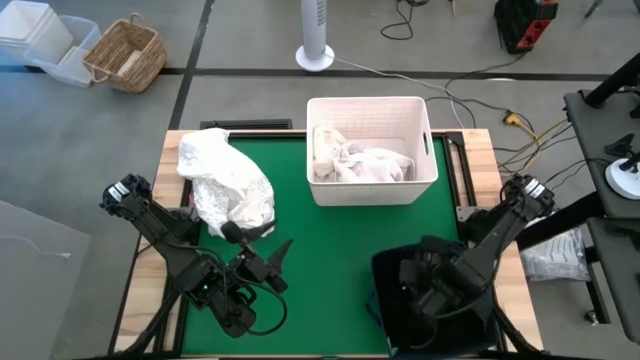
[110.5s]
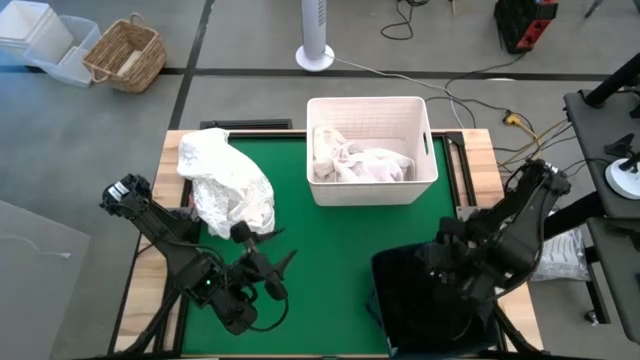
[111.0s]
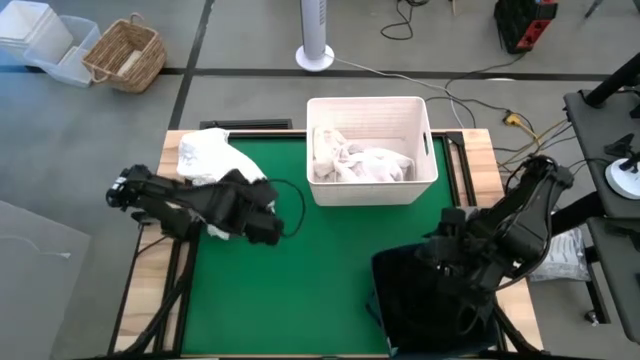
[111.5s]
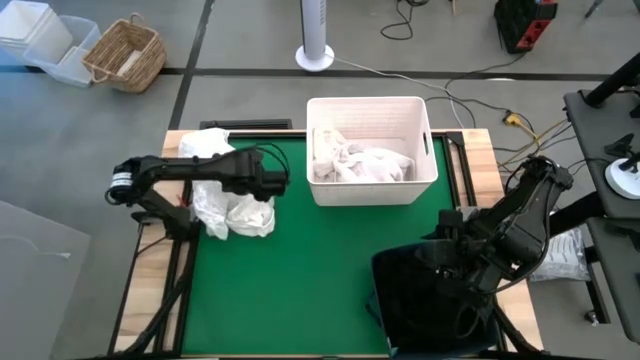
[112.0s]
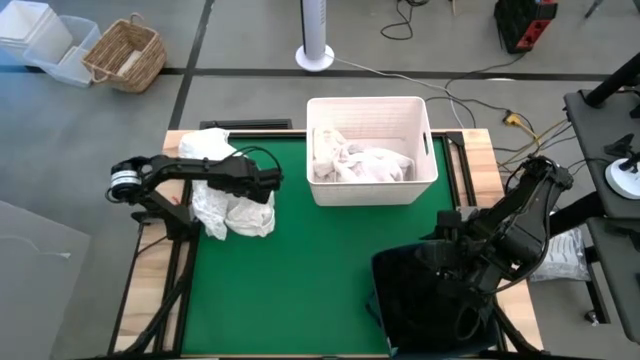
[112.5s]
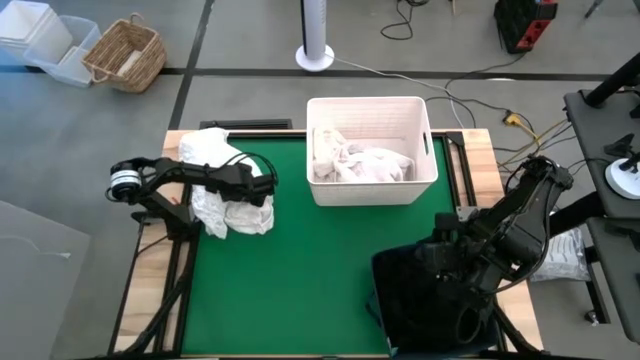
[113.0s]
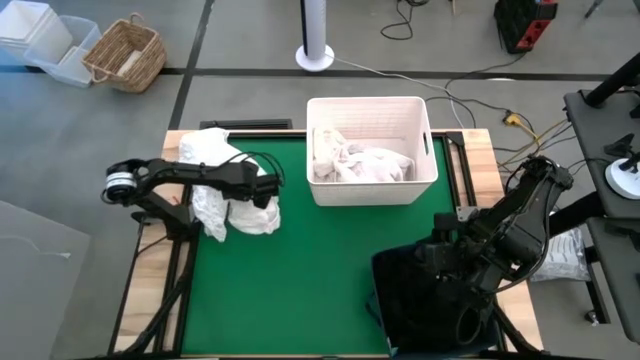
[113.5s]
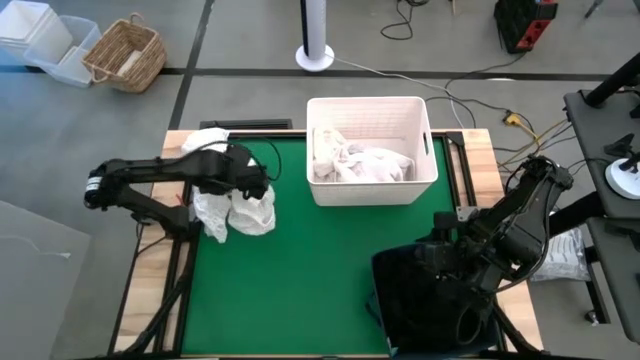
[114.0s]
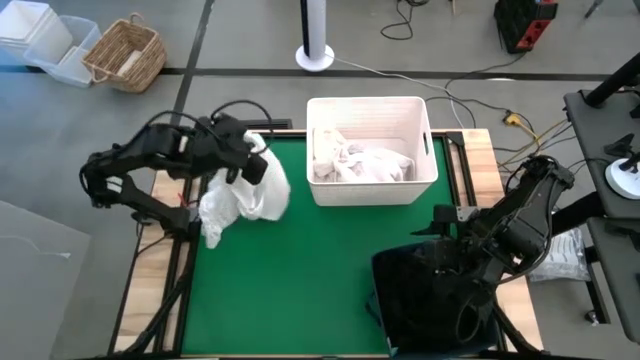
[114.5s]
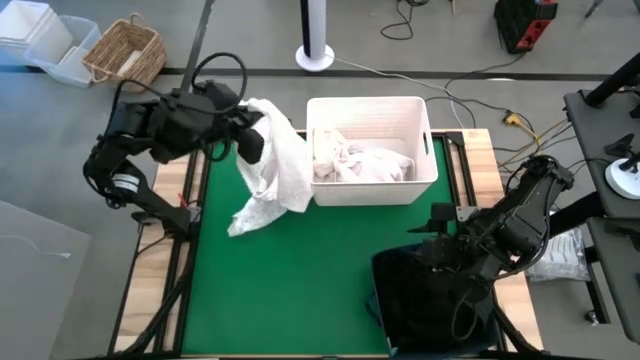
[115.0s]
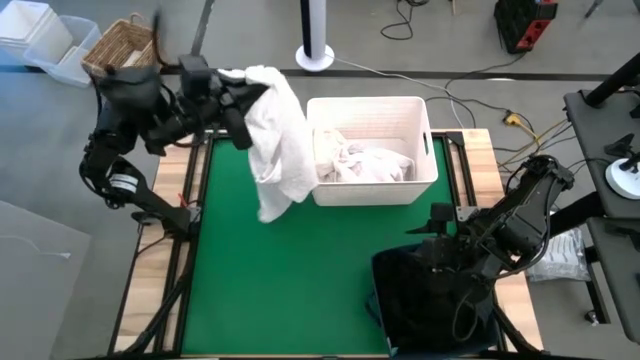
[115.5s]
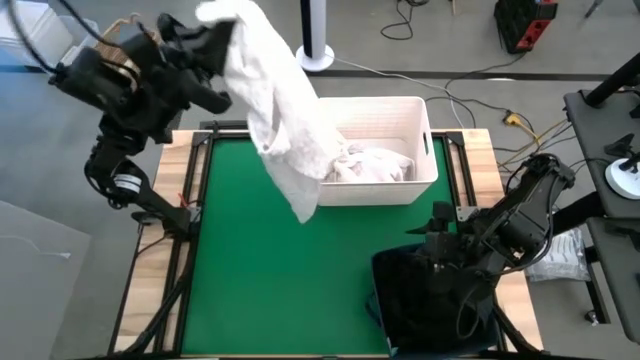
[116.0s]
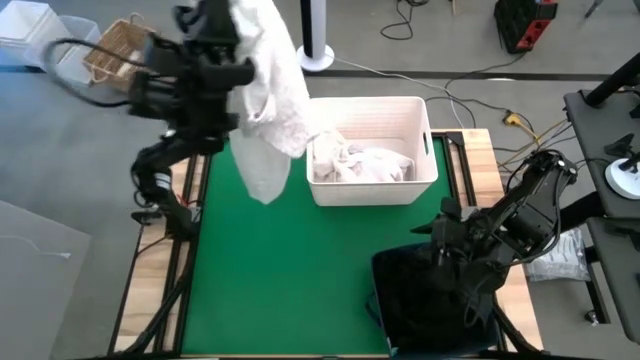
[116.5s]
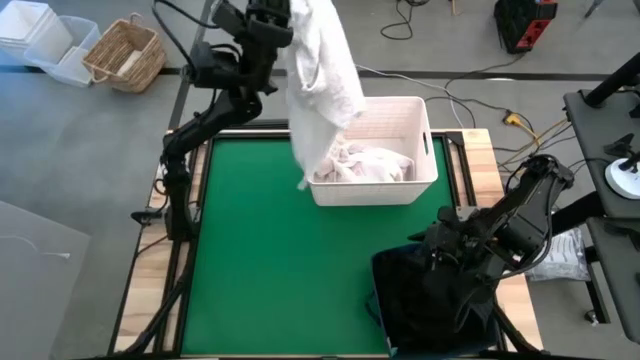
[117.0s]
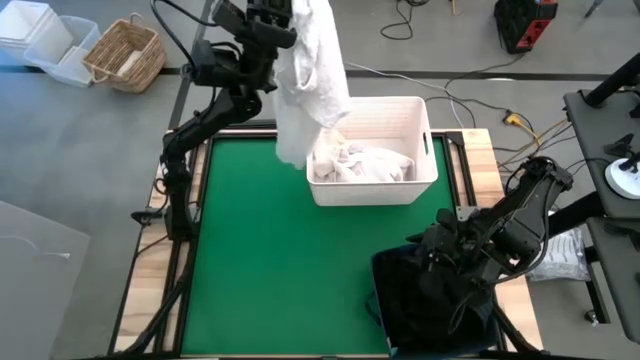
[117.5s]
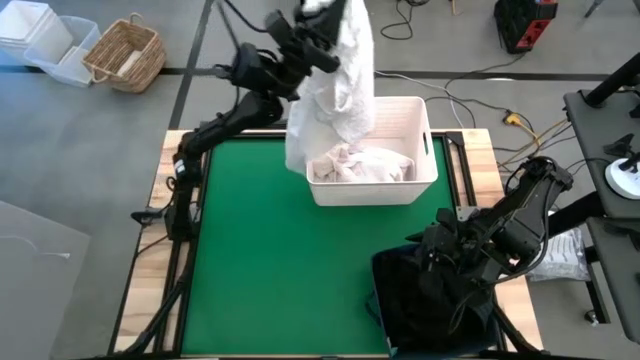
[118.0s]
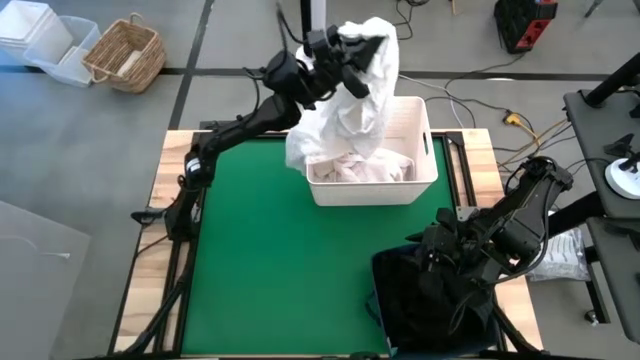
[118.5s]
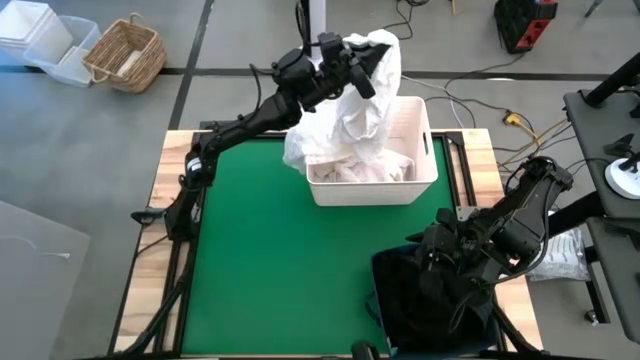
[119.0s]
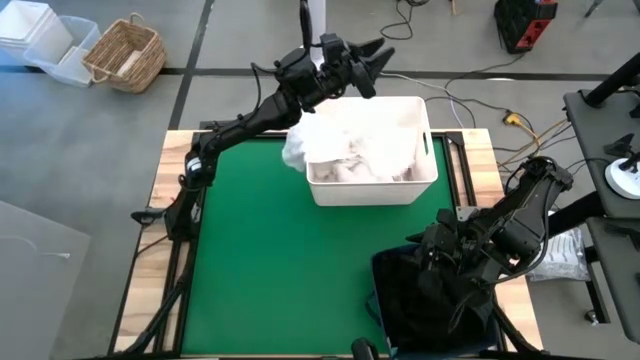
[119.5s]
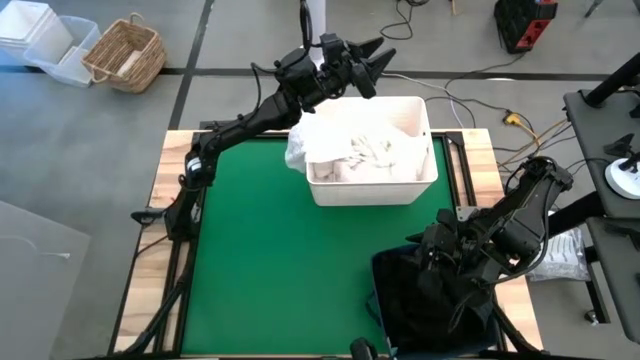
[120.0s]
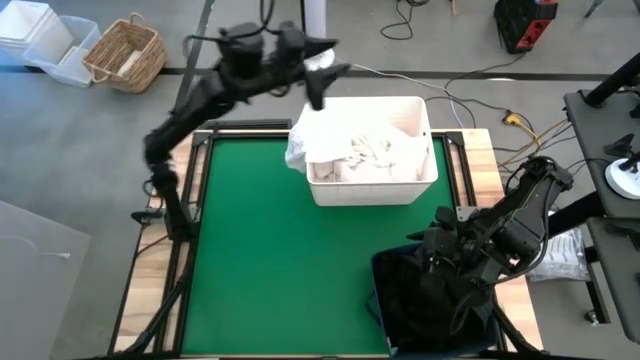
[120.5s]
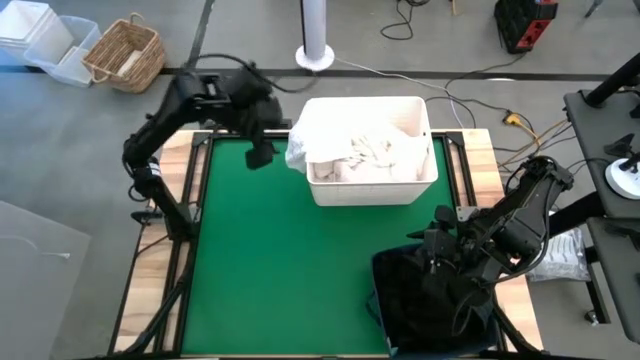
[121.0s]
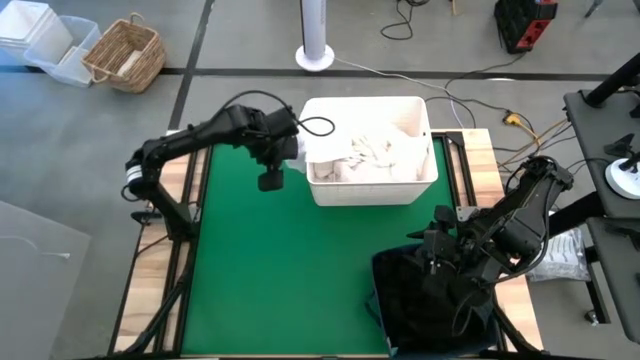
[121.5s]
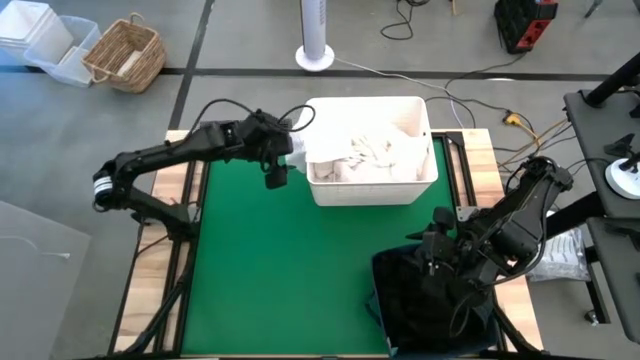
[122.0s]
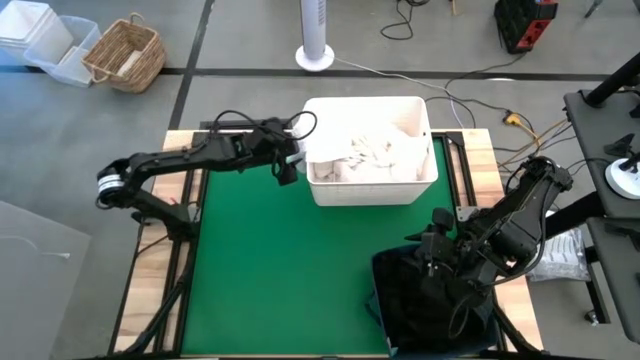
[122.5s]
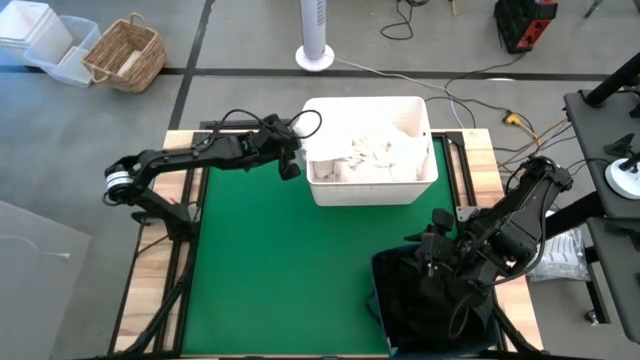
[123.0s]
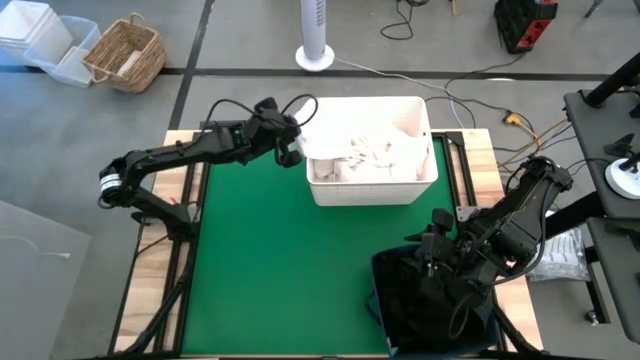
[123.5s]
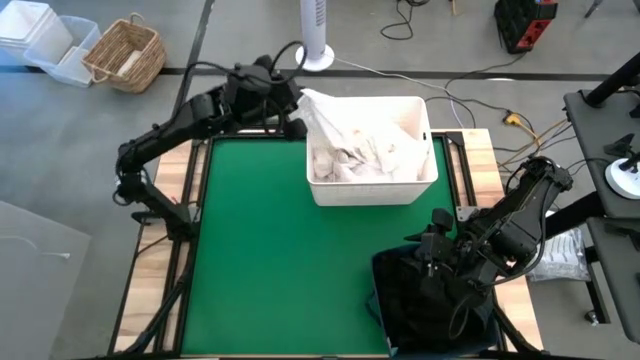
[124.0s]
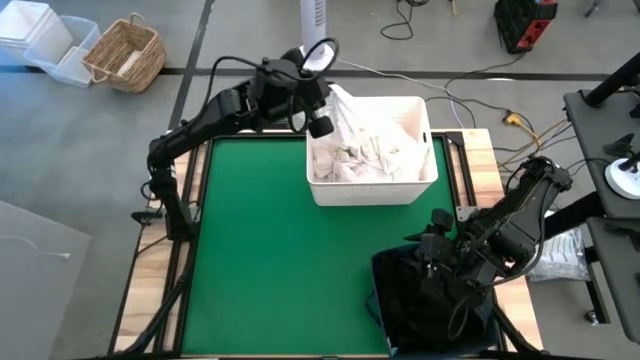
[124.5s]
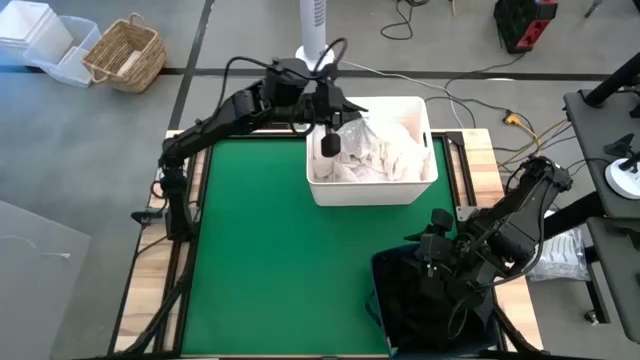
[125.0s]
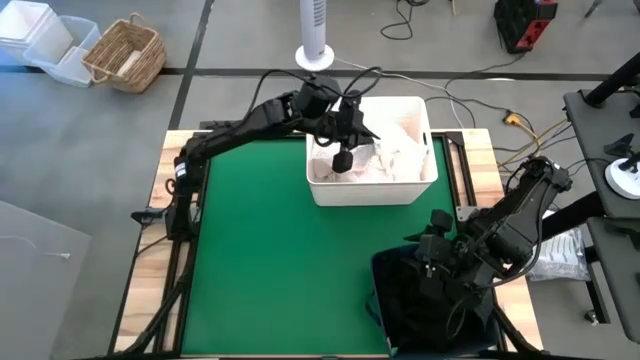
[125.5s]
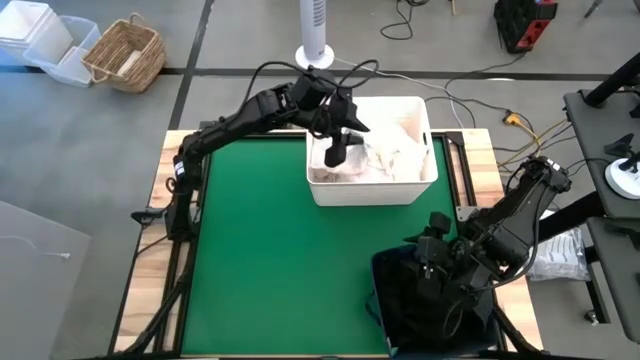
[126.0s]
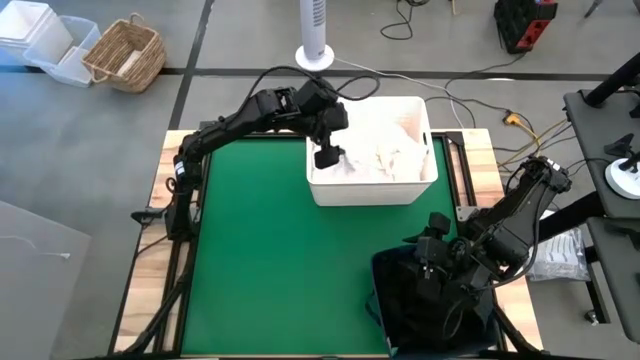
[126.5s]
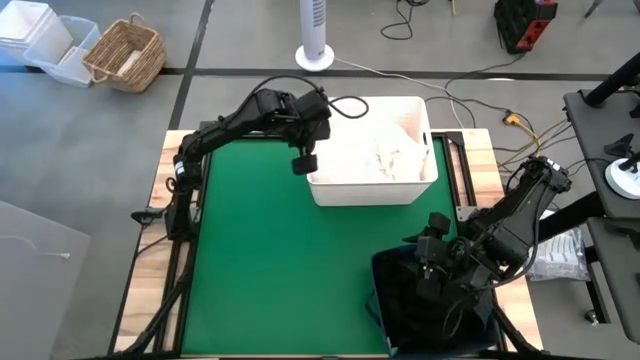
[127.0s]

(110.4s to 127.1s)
Put the white shirt into the white laundry bin
